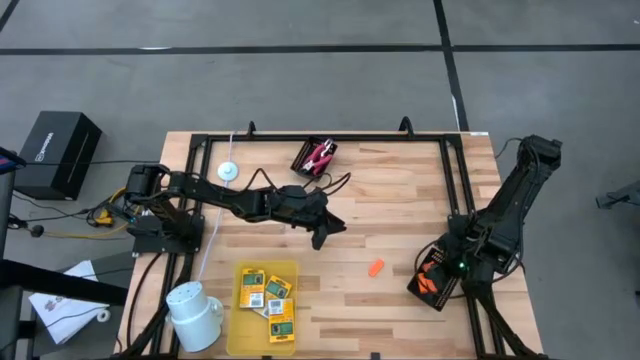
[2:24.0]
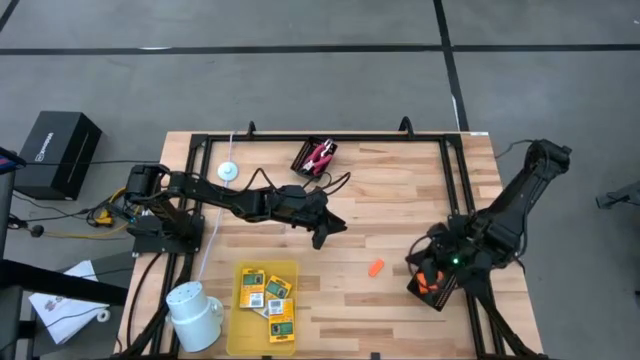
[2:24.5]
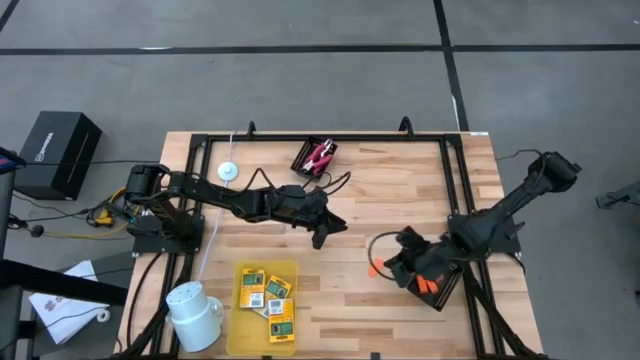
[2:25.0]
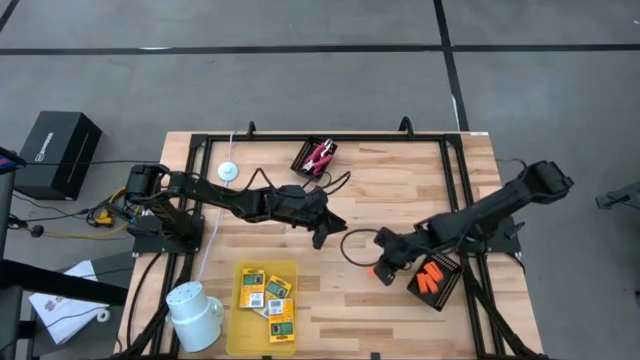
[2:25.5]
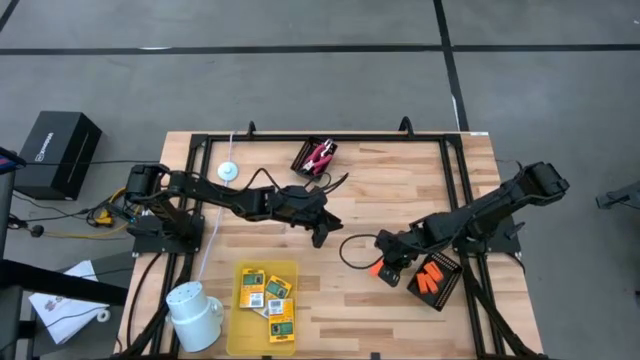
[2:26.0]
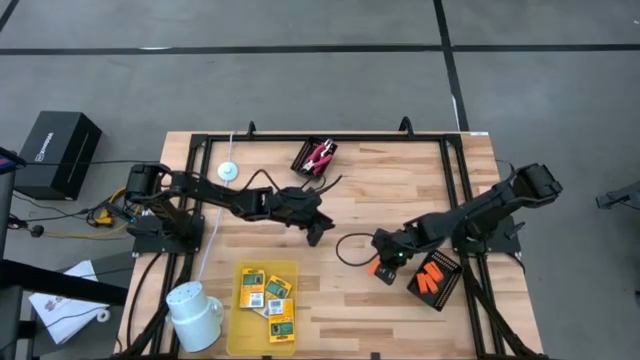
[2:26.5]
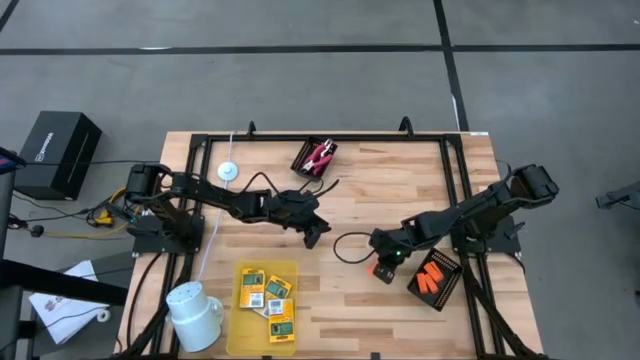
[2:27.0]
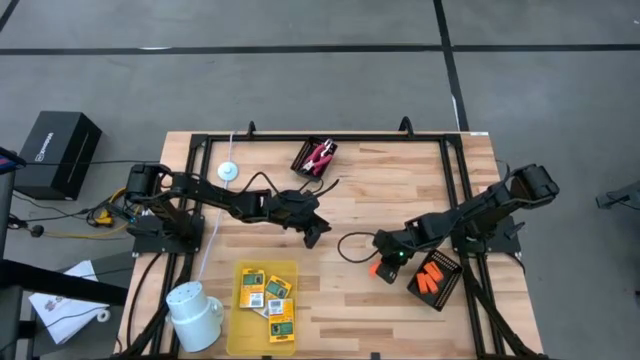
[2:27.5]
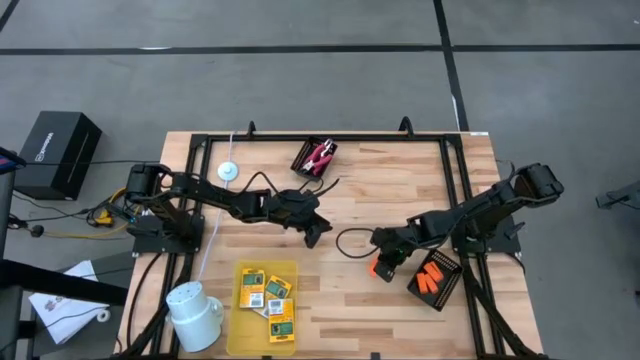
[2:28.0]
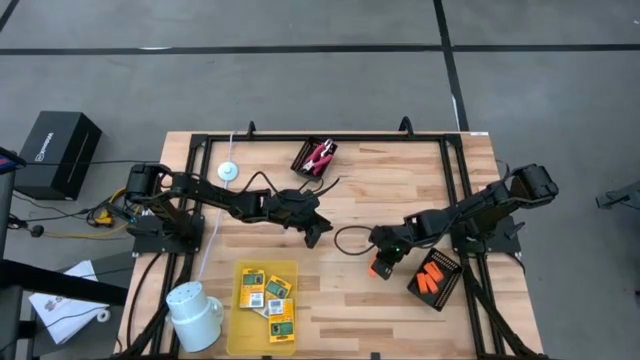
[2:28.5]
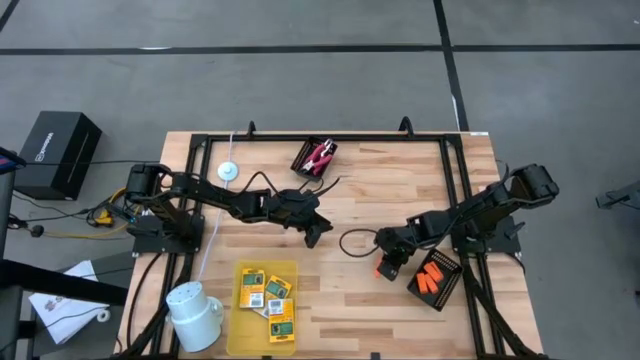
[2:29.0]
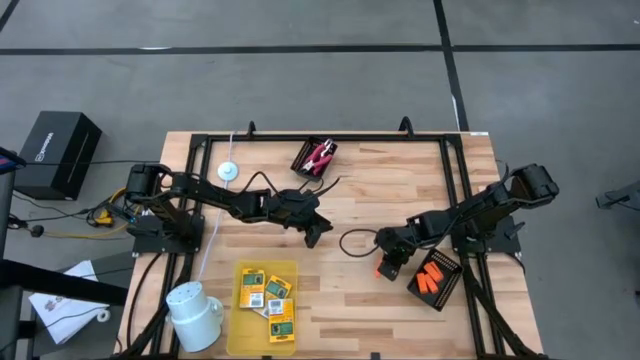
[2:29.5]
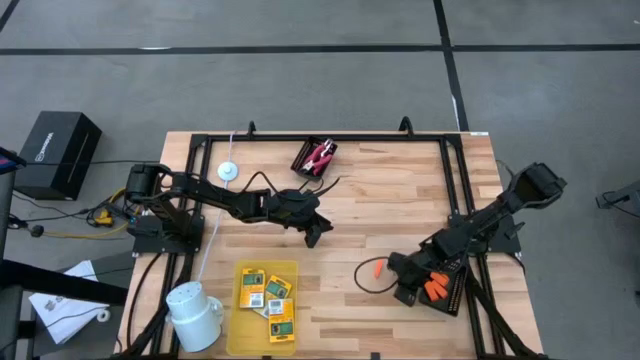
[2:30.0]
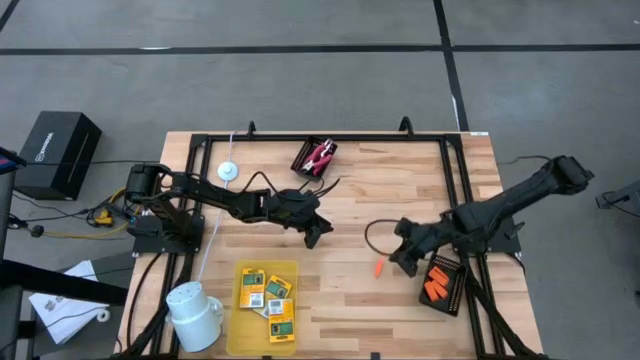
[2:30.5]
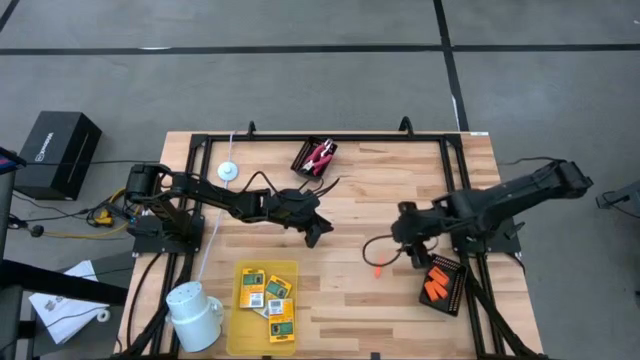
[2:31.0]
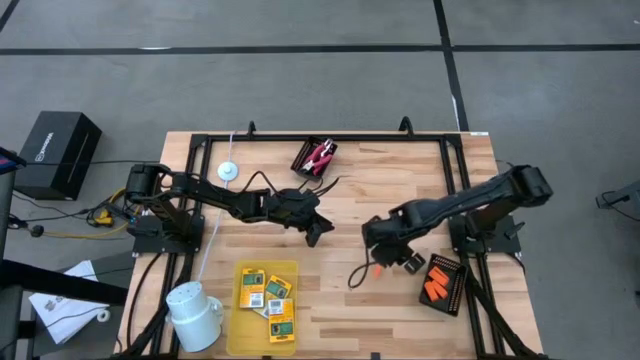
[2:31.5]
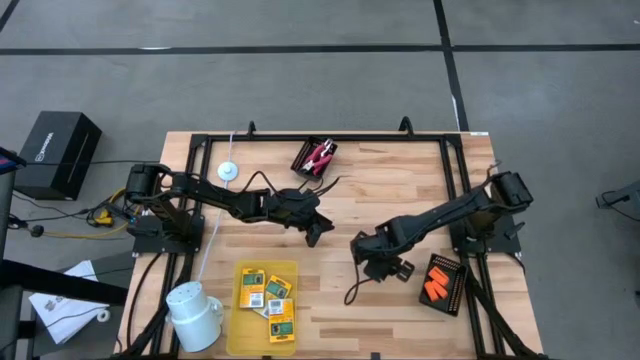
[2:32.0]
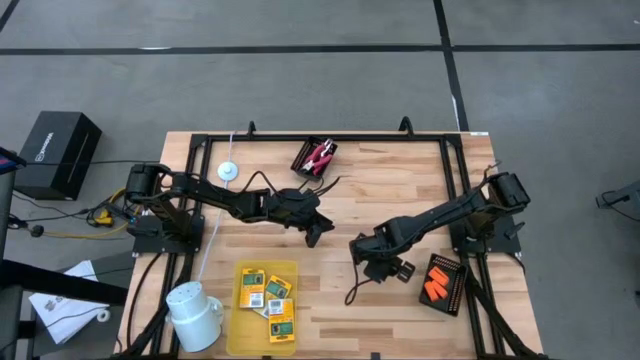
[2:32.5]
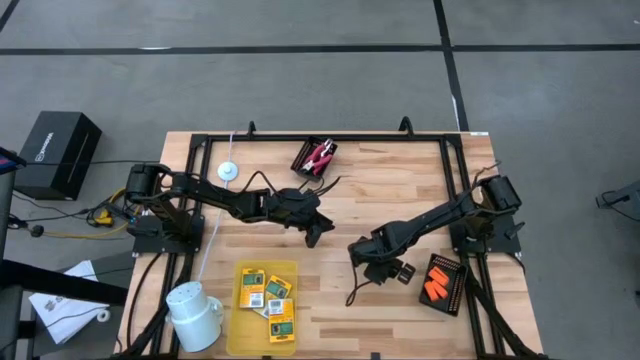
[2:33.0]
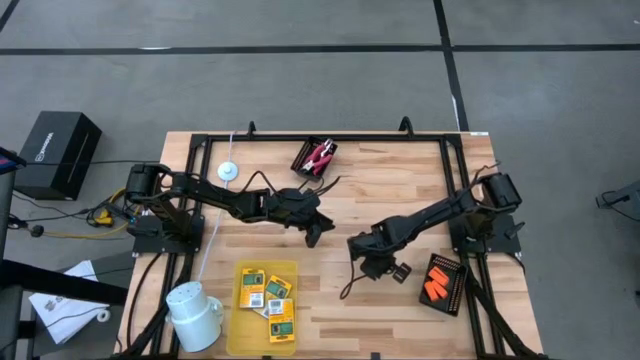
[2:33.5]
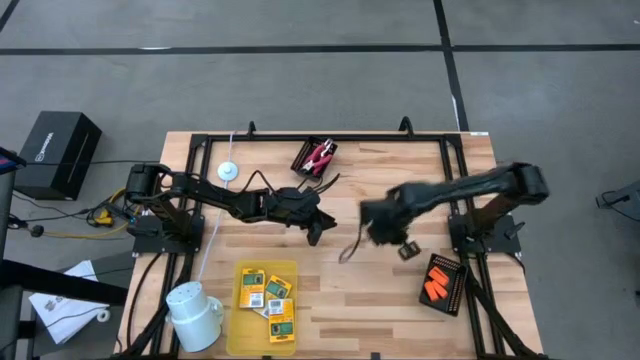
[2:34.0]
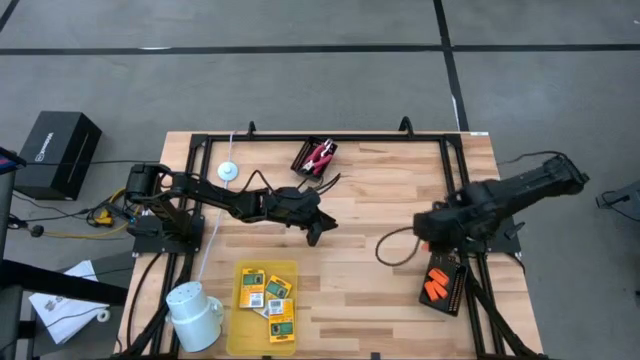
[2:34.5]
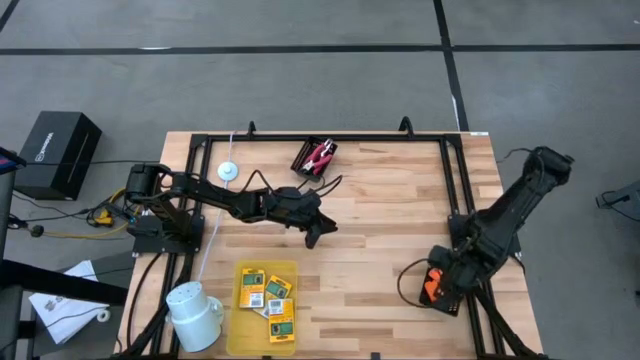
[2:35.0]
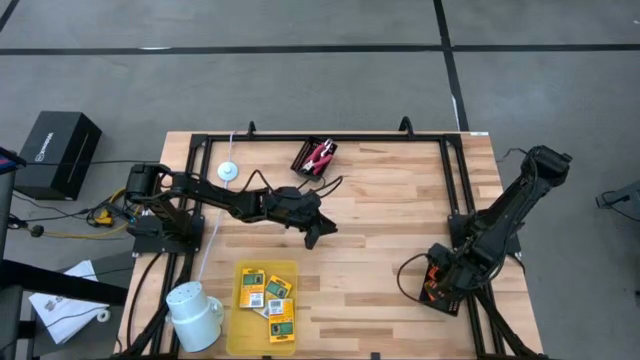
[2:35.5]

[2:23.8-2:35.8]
Task: Pick & Place School Supplies
Put the orange eraser into the bottom black bin

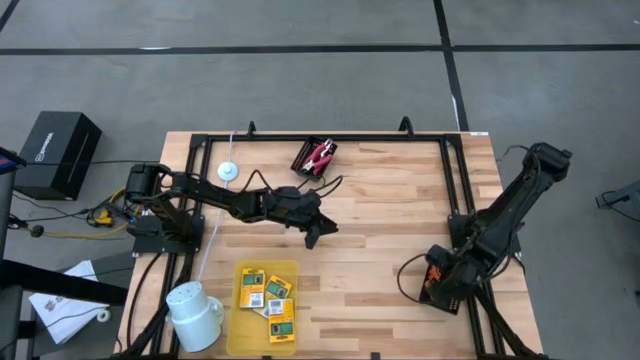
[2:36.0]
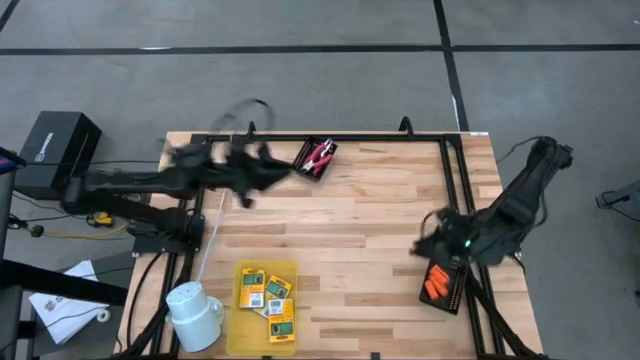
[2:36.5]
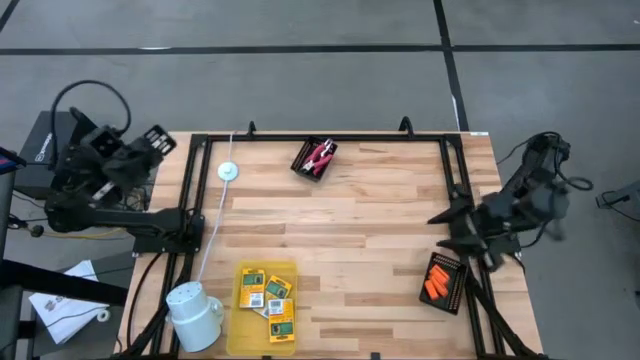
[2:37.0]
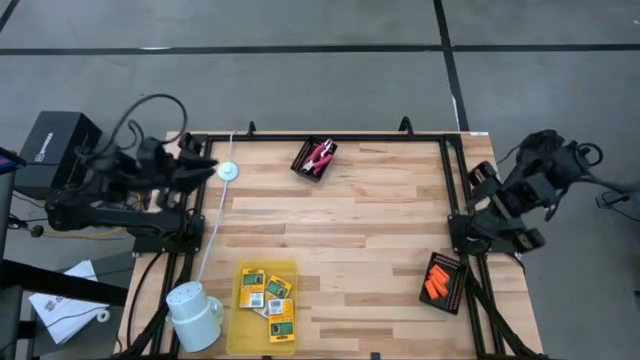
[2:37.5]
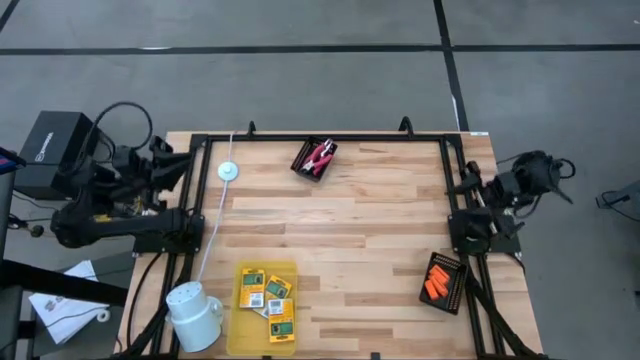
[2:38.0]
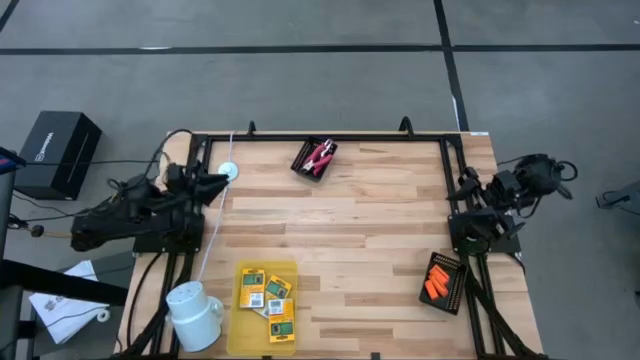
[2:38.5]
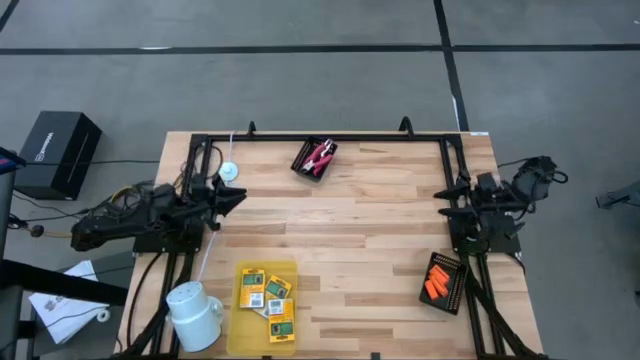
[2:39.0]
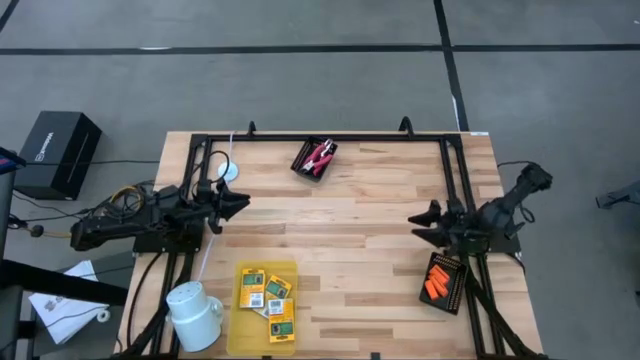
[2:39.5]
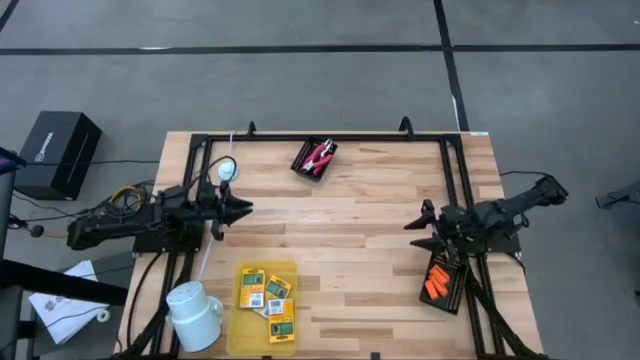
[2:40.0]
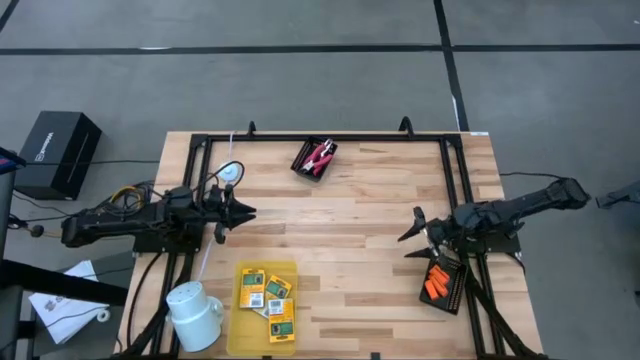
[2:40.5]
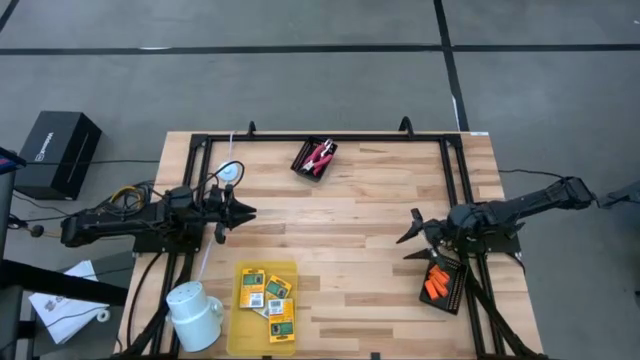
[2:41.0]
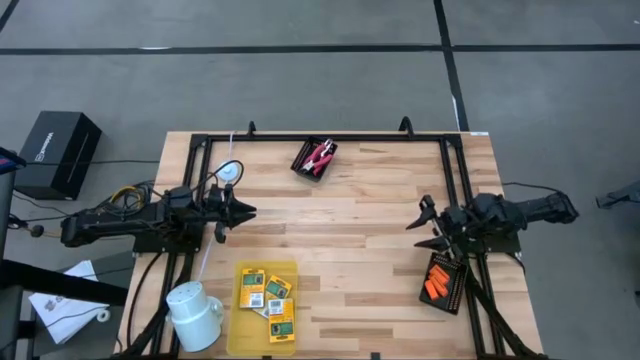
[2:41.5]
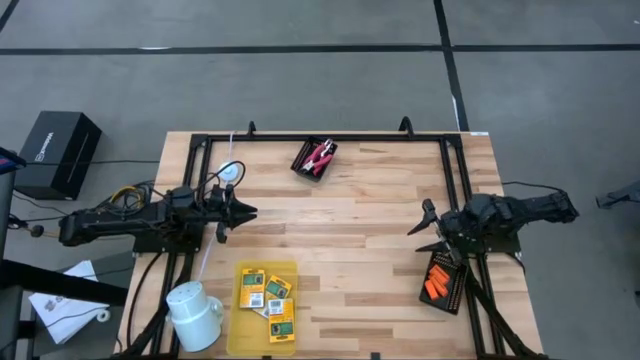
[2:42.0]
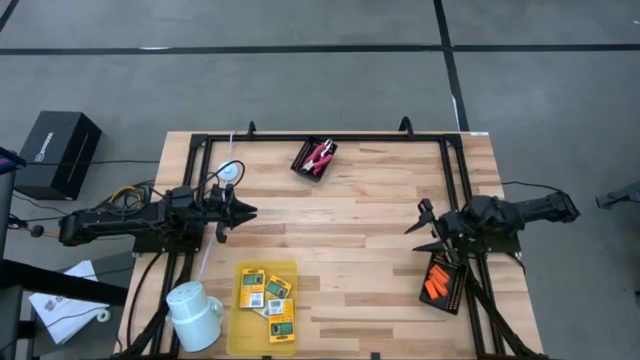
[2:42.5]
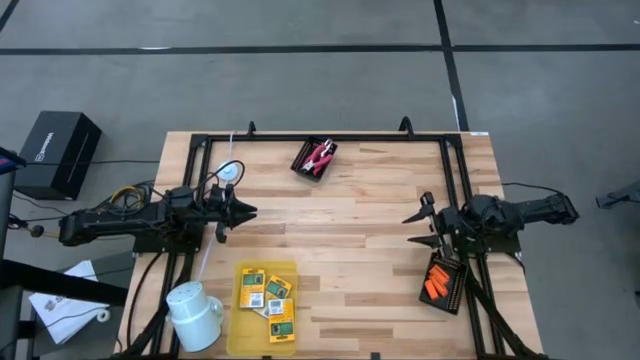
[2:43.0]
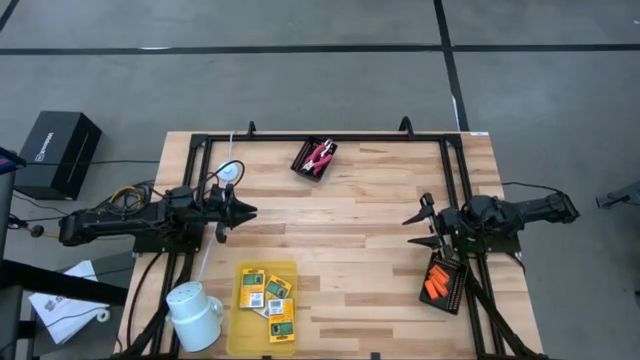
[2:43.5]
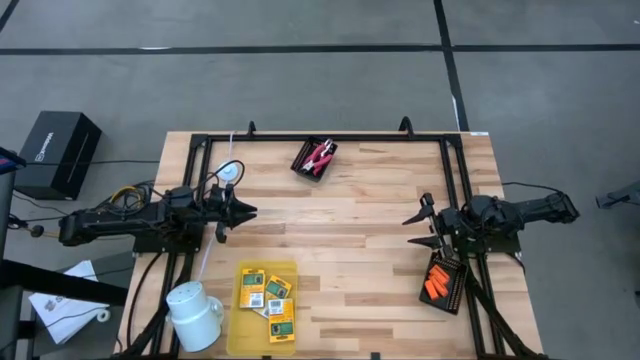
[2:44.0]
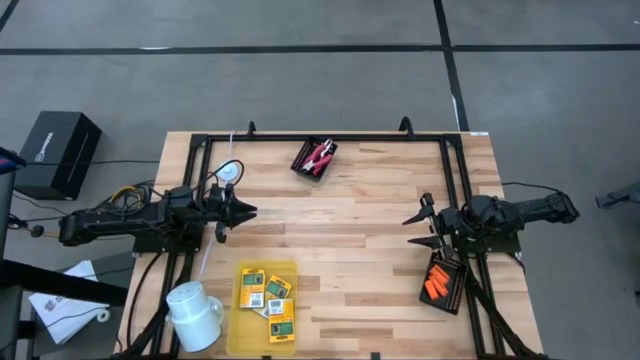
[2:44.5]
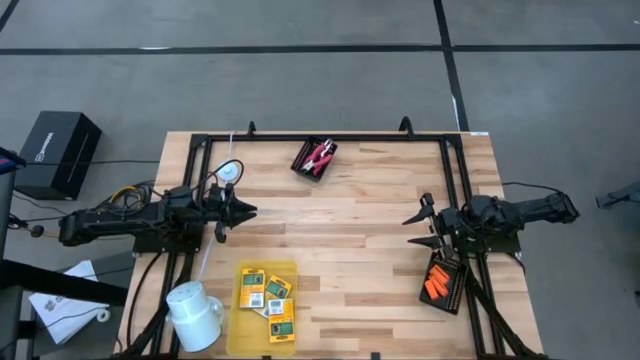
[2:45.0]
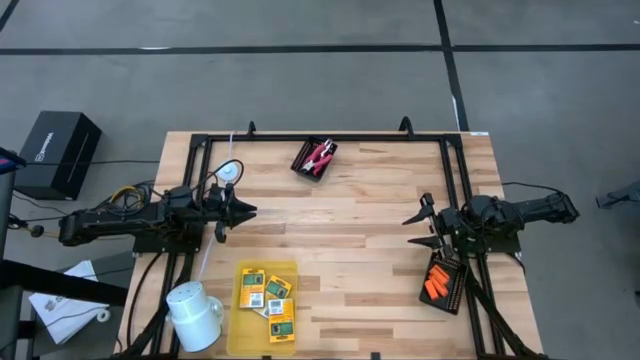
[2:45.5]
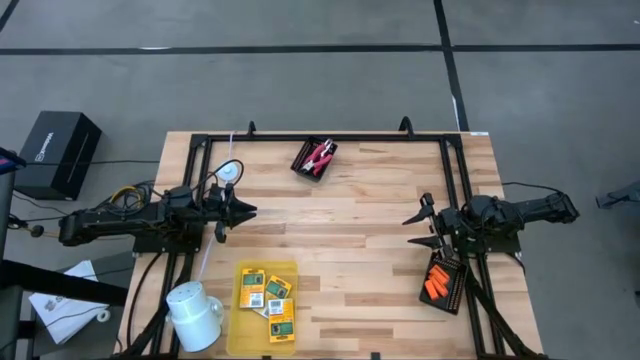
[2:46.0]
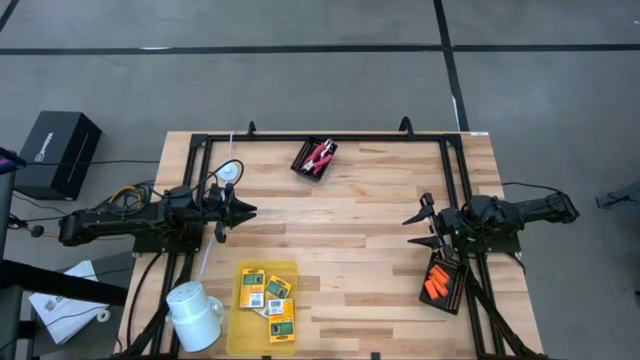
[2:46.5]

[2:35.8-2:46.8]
Return to Home Position
